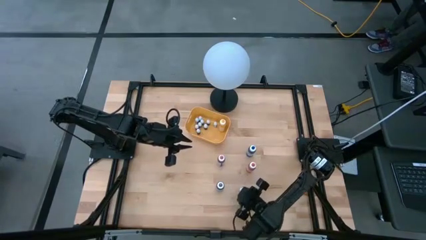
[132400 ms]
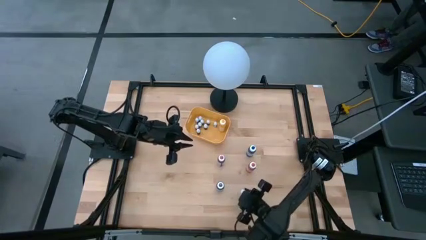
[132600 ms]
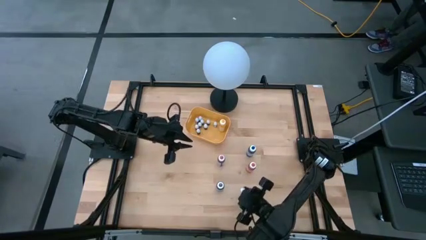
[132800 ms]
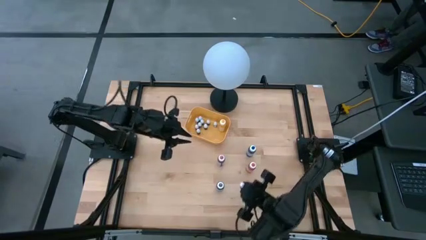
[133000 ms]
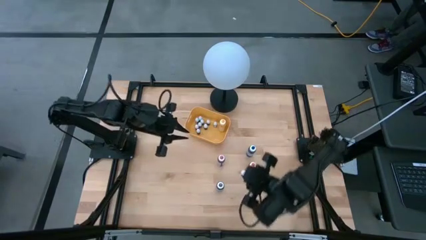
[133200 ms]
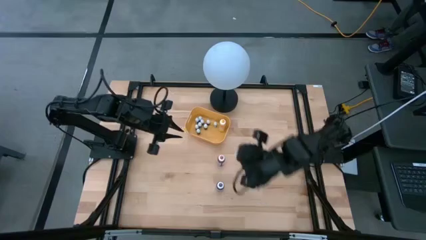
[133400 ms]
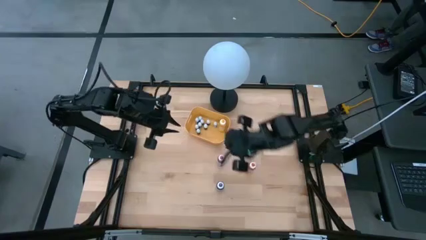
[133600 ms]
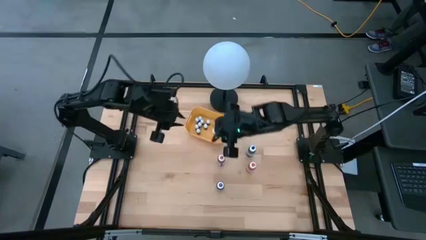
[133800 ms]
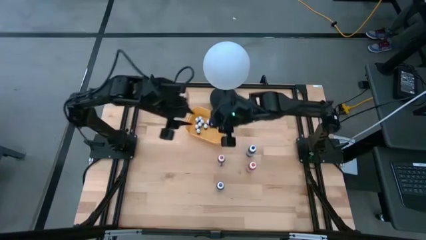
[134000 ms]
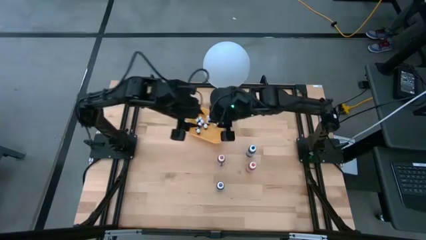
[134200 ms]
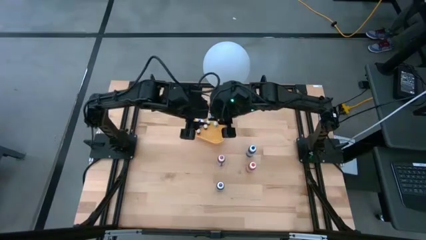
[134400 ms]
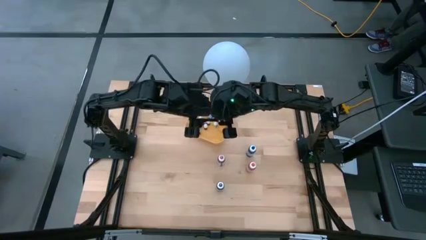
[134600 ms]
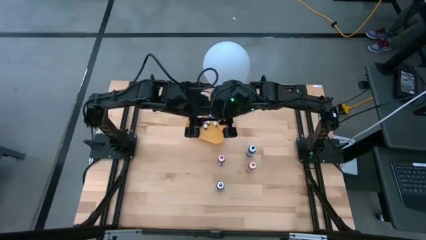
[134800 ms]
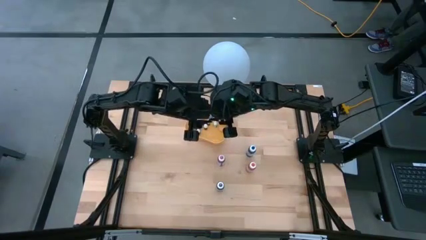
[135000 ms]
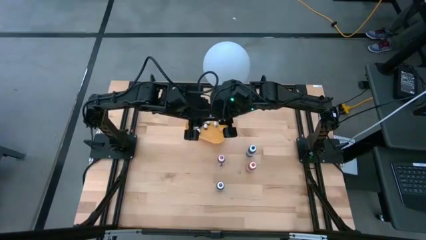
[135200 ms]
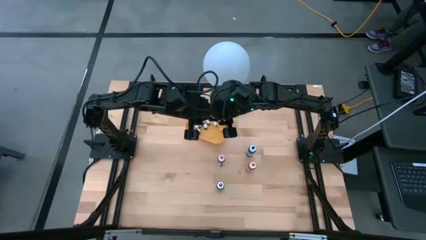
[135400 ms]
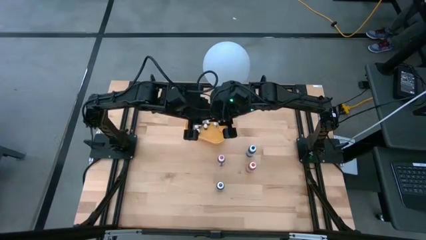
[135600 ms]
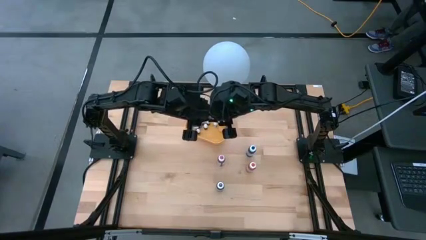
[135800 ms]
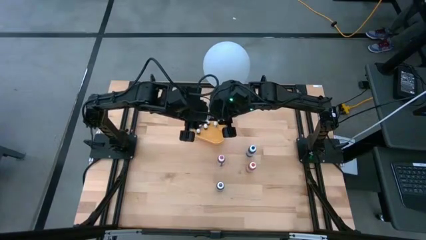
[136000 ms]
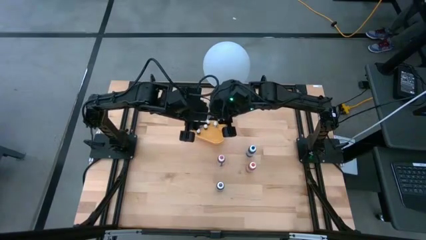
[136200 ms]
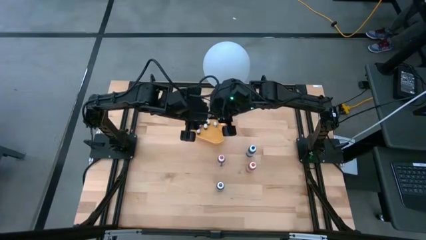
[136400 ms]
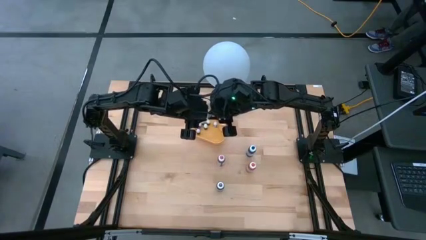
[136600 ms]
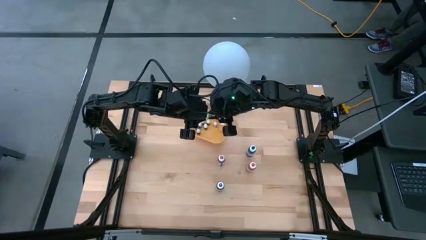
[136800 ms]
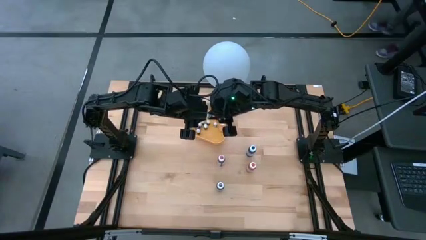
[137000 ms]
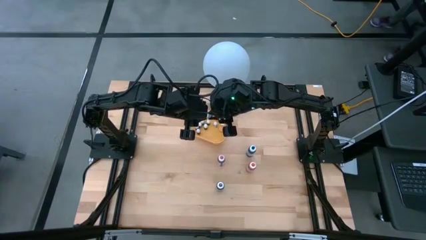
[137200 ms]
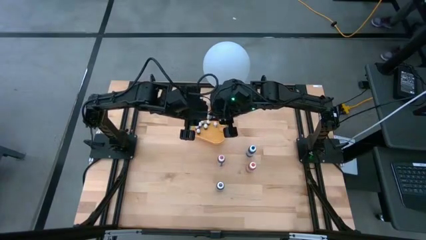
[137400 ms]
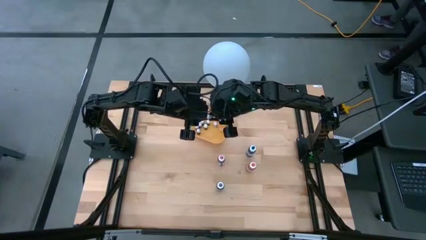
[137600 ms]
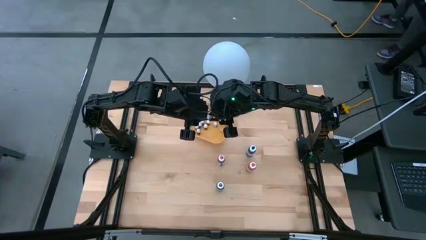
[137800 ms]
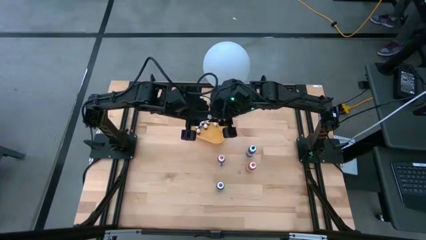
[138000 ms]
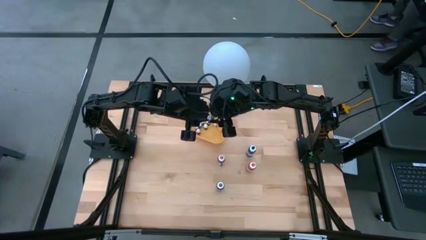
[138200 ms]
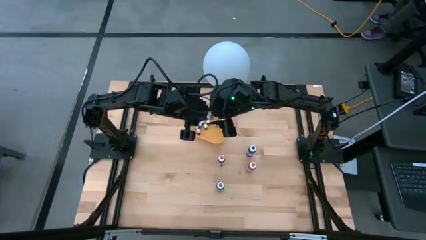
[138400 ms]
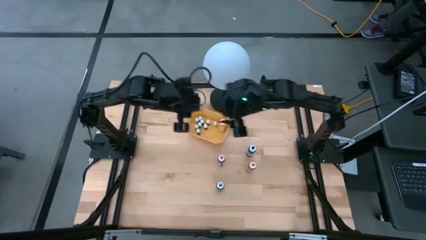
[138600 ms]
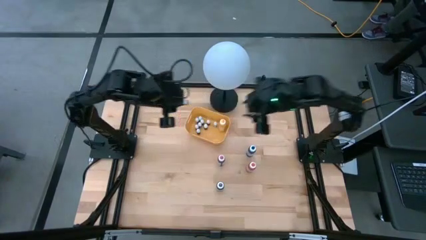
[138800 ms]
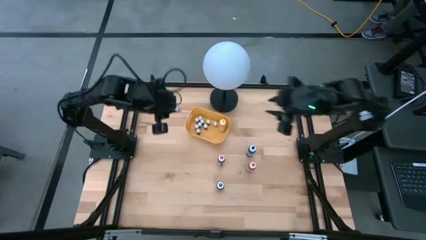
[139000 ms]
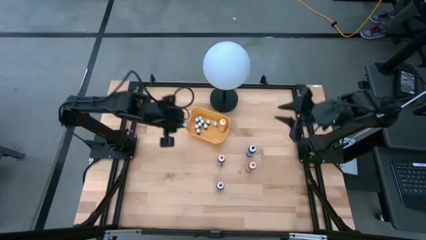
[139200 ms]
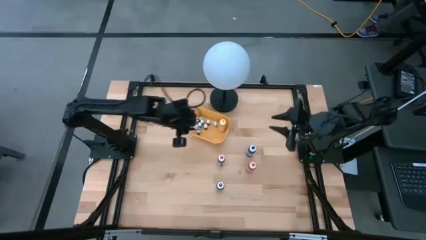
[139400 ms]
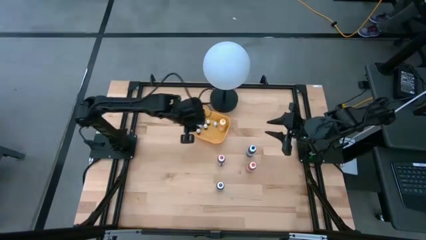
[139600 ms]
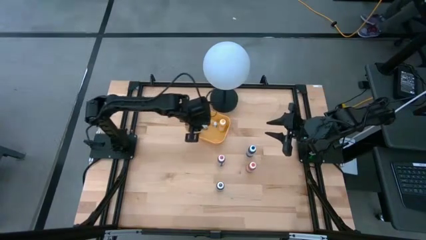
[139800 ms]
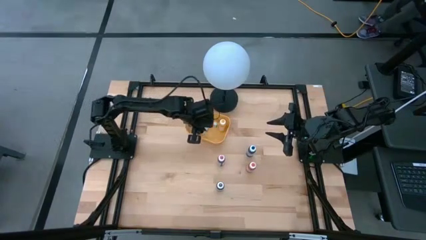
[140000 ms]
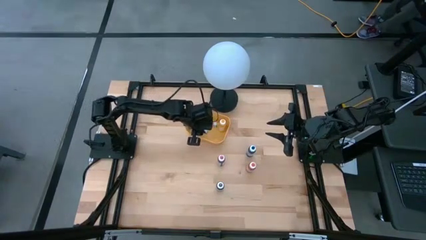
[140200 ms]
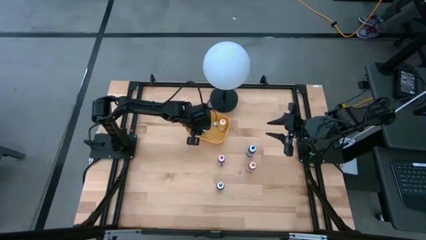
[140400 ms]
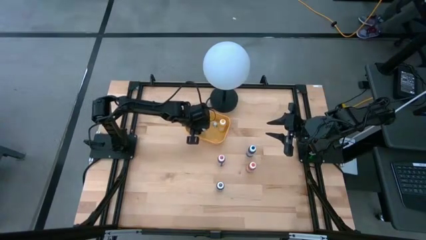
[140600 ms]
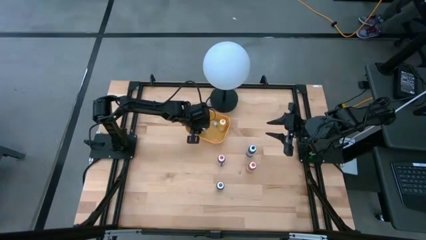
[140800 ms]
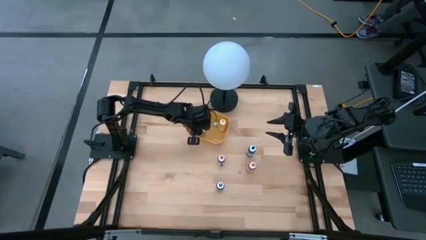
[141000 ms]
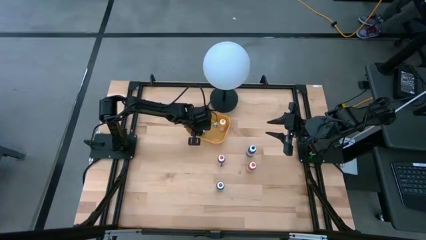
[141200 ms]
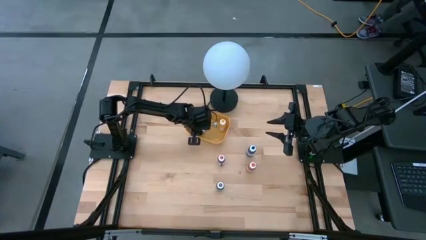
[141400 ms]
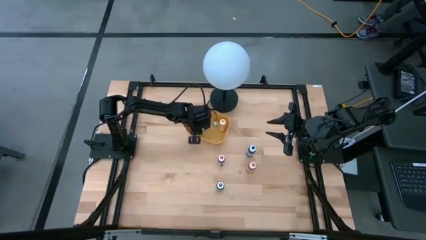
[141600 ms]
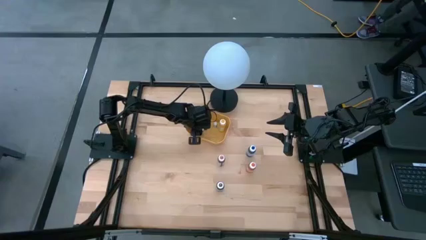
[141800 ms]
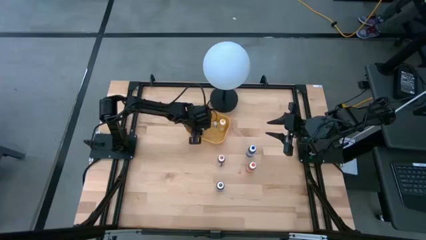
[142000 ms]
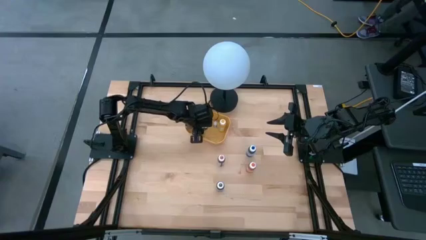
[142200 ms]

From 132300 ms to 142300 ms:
Task: Pick & Place food coloring
Put the small green food coloring bottle into the yellow bin

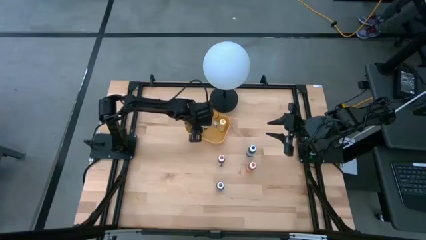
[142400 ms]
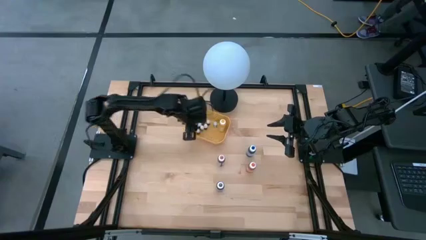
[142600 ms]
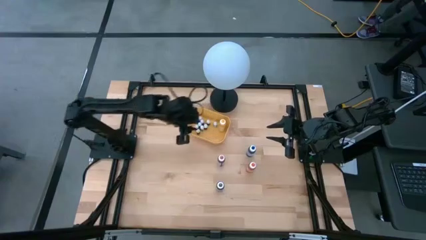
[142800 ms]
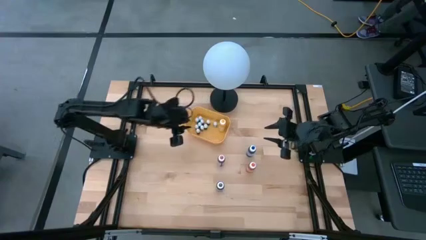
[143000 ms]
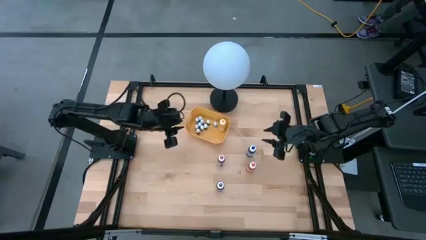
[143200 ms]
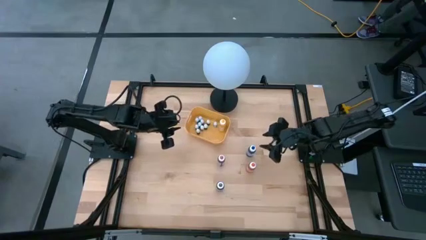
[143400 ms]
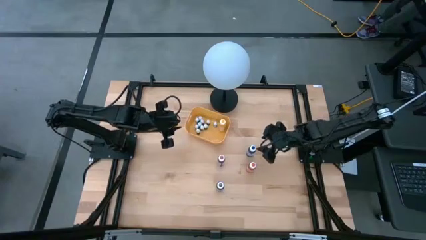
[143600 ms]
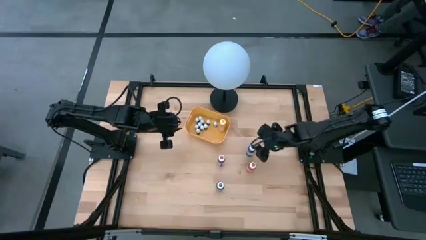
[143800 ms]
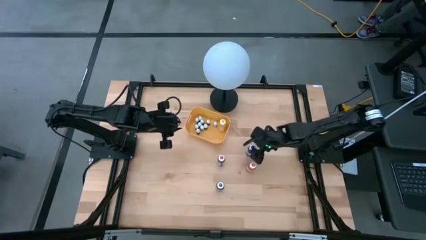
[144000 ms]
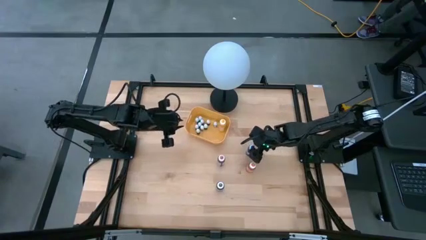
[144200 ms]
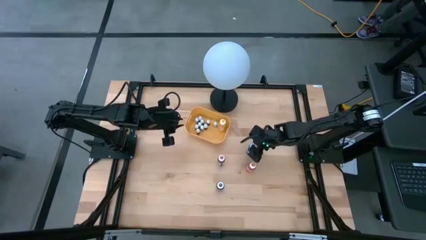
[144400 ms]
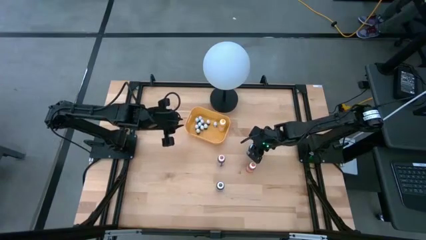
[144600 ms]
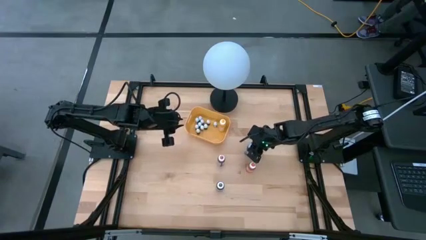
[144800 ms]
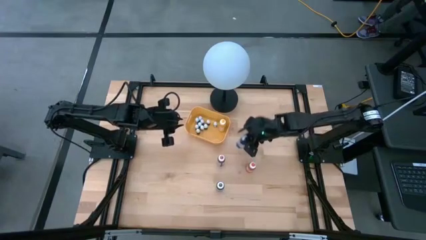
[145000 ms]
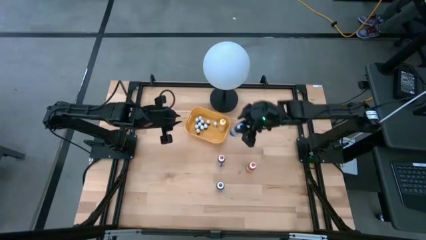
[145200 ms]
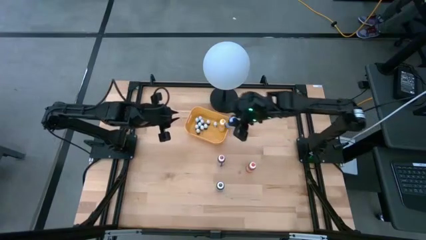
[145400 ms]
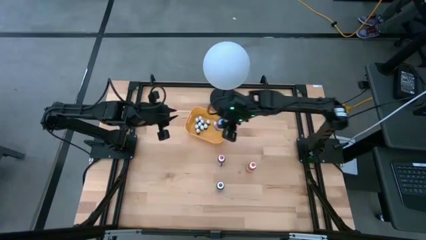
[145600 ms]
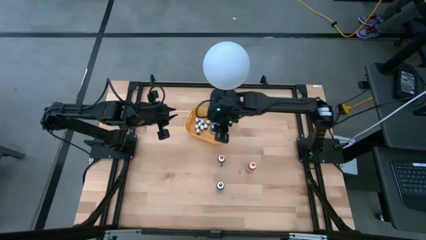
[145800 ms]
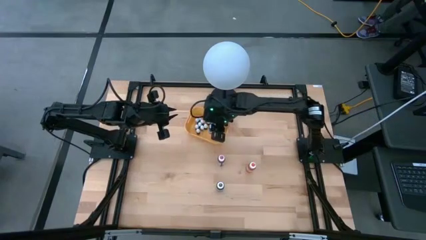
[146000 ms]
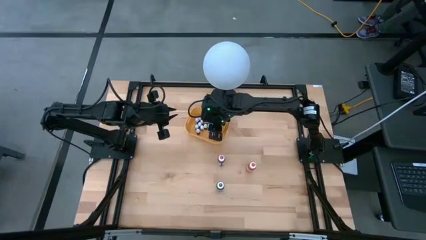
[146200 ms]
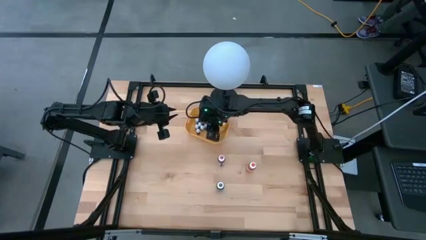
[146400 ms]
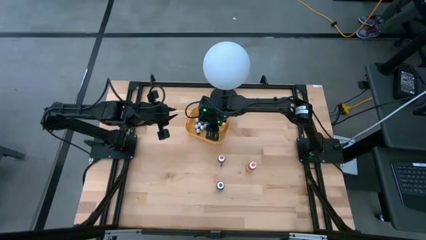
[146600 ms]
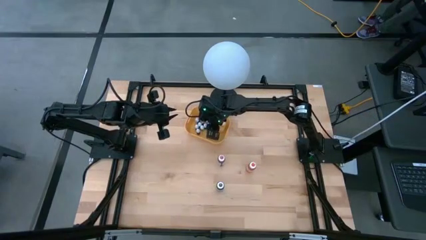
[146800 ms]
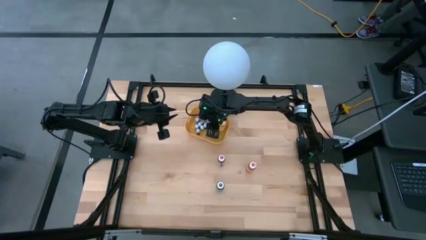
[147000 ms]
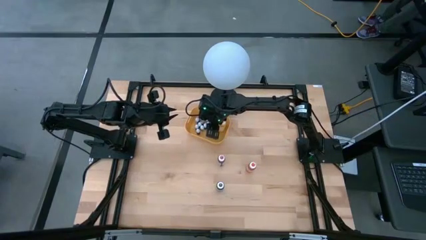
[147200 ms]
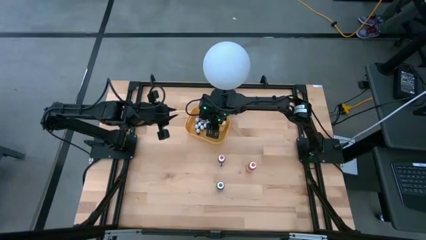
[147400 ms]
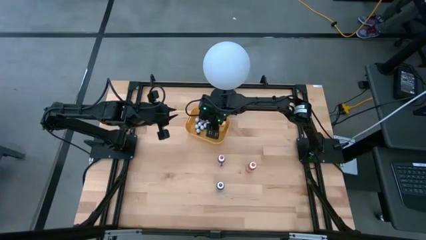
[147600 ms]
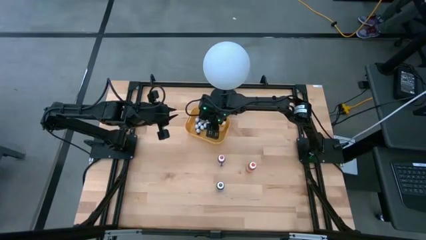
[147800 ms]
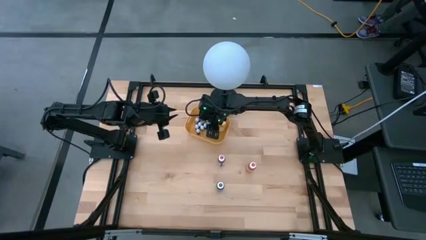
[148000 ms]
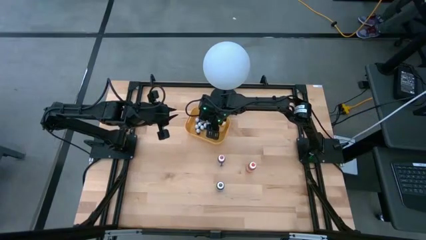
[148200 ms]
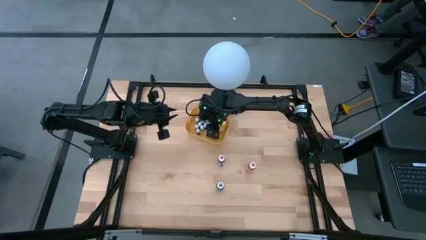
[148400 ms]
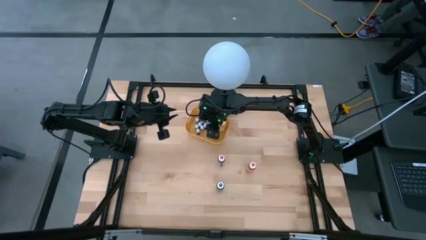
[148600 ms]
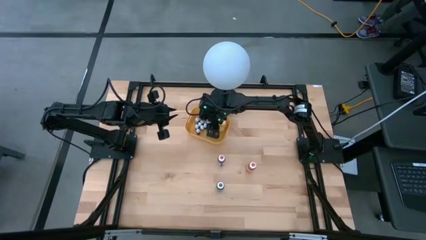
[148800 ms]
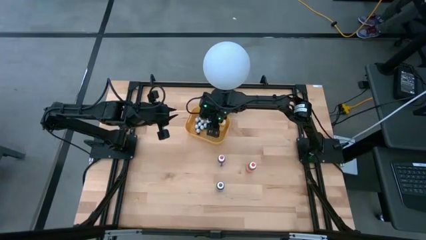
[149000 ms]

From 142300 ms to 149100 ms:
Put the large blue food coloring bottle into the yellow bin
